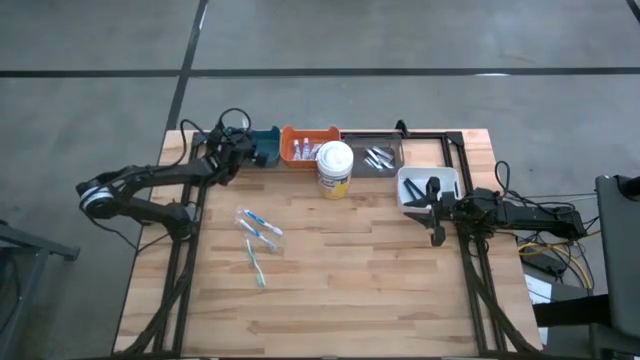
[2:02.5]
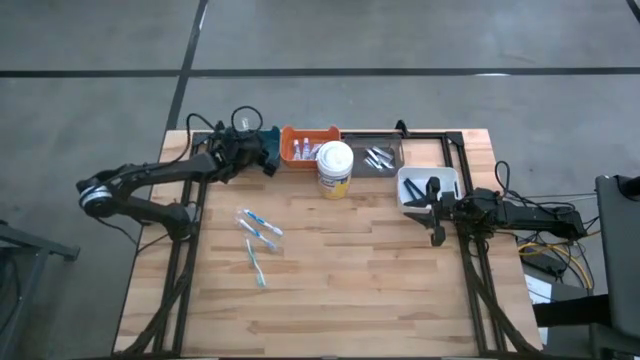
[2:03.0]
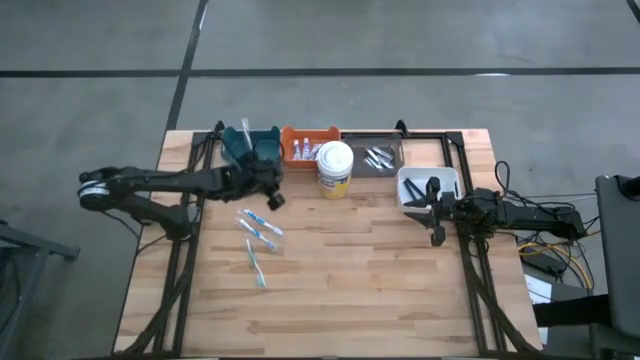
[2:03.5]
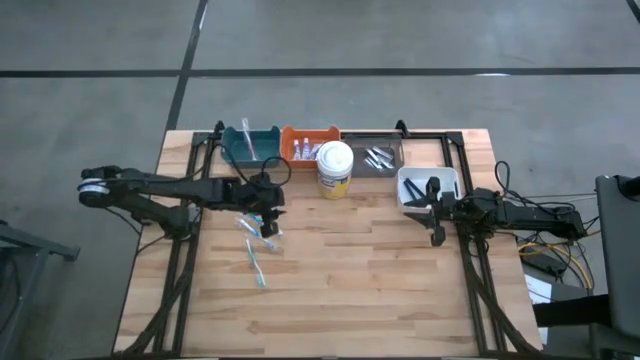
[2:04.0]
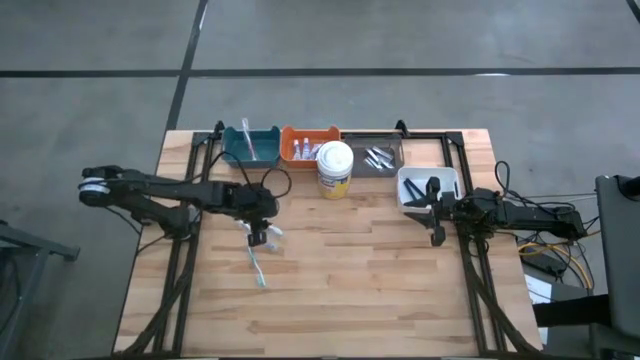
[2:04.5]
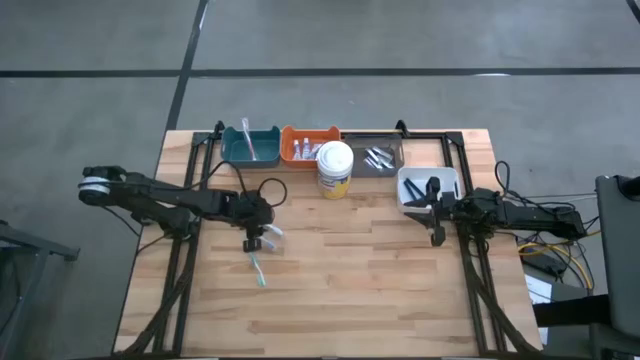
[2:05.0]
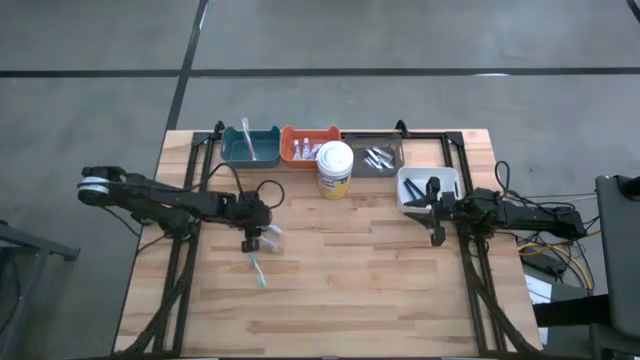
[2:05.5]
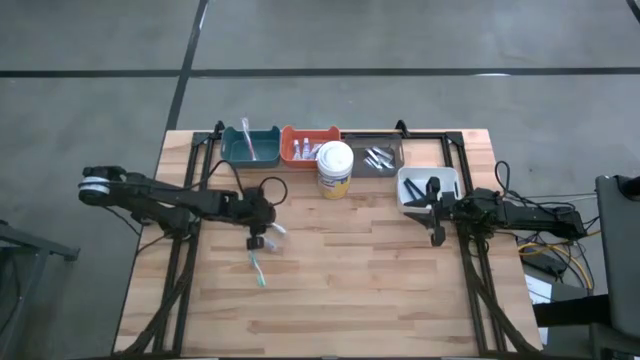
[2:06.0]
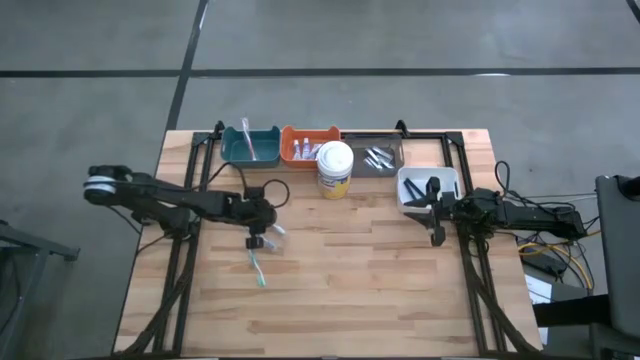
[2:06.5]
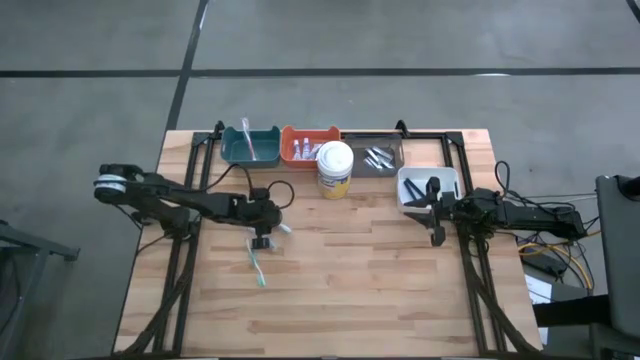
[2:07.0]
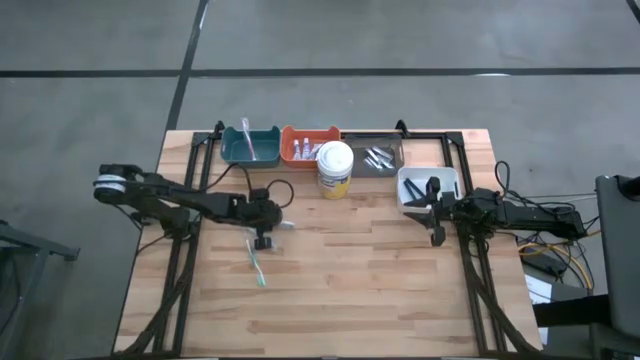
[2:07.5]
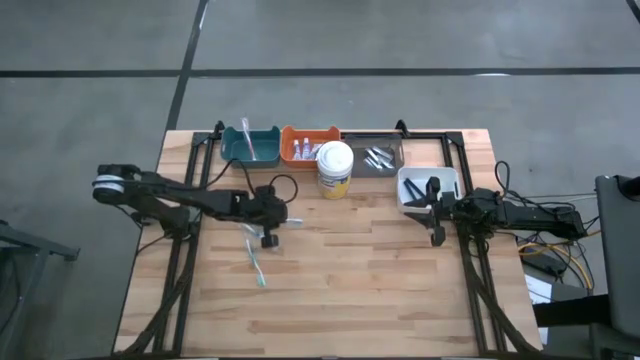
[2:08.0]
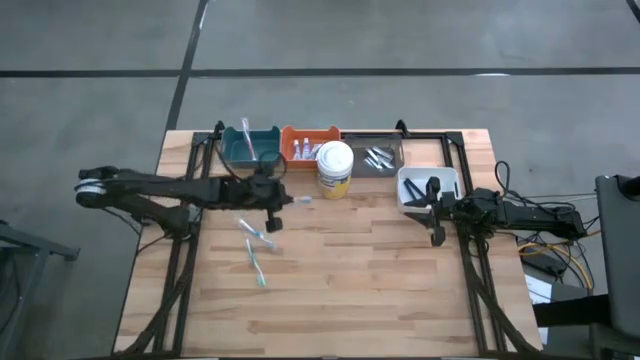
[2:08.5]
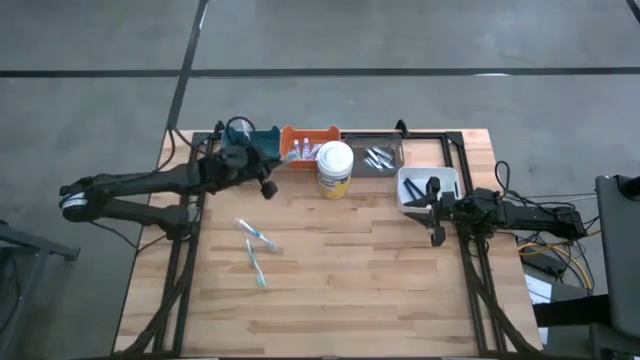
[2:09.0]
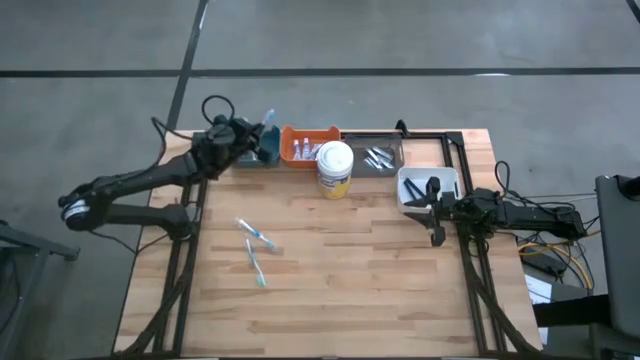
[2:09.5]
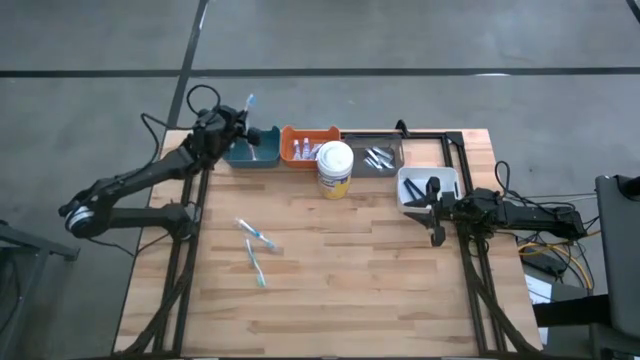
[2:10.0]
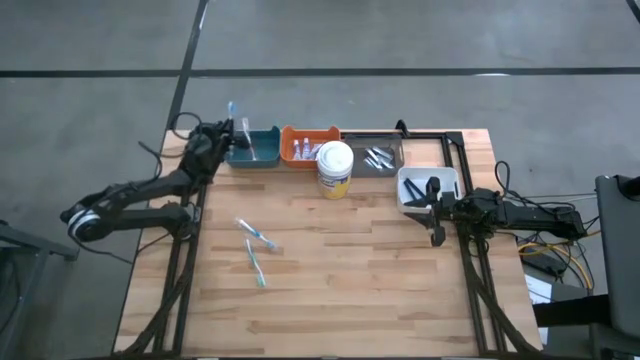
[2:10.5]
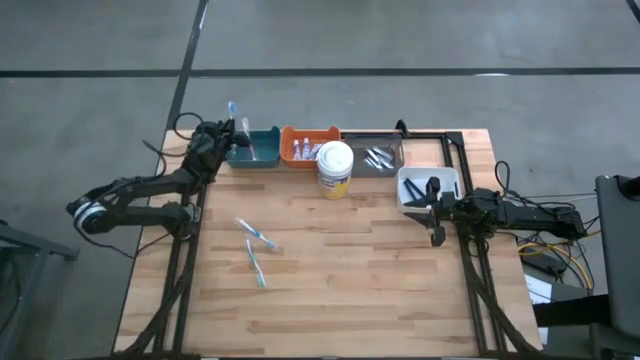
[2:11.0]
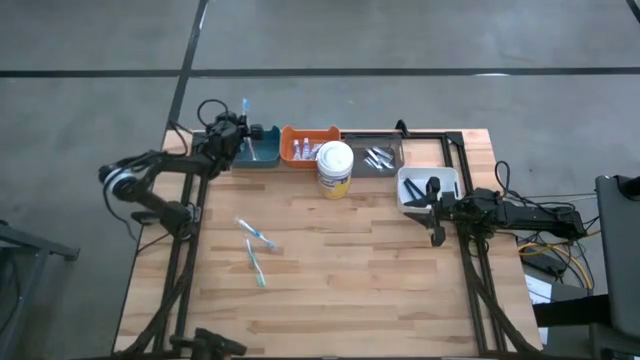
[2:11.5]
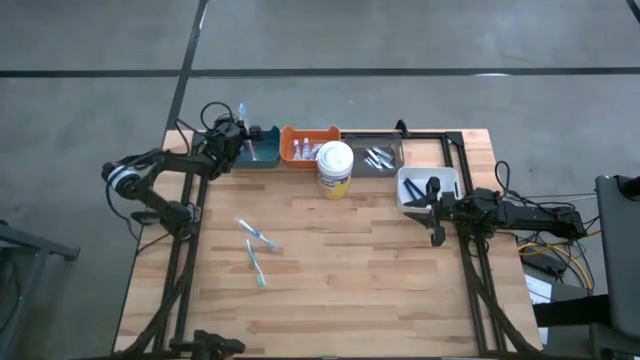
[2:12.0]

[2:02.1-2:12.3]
Task: Pick & Place Travel size toiletries
Put the top blue toothbrush into the blue bin

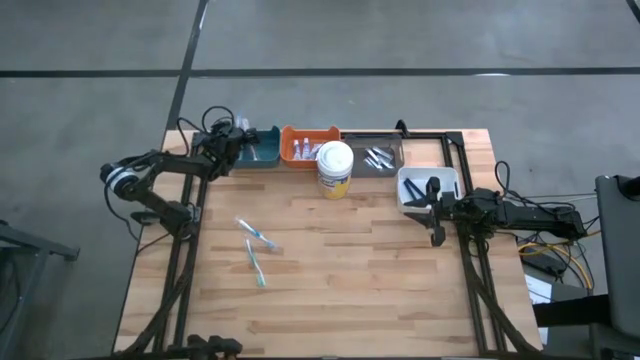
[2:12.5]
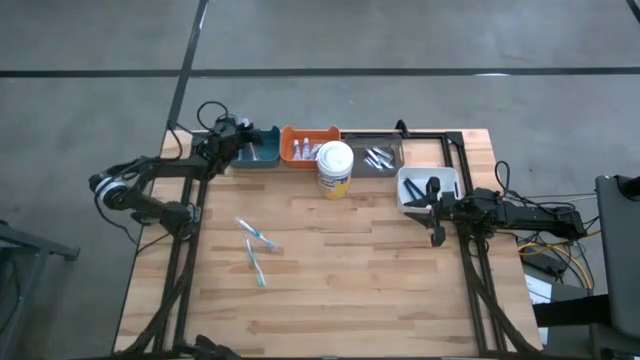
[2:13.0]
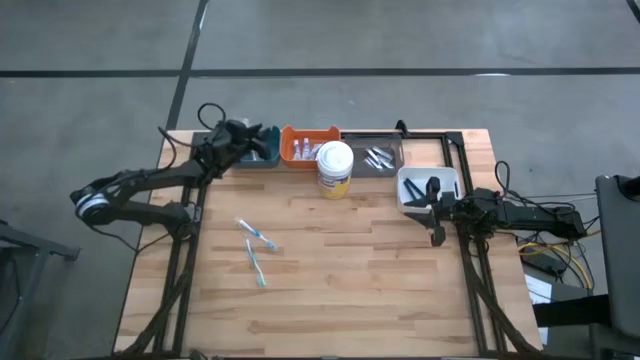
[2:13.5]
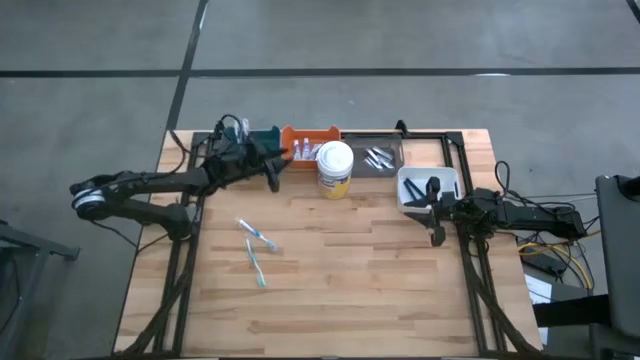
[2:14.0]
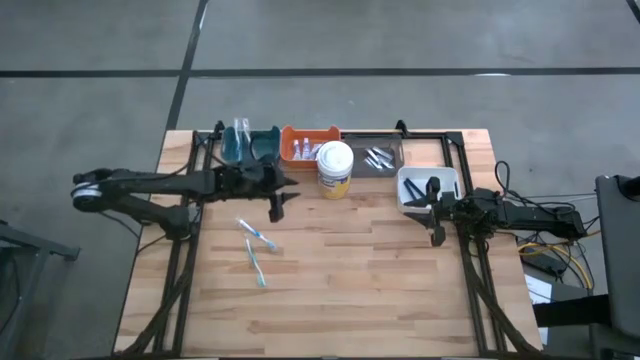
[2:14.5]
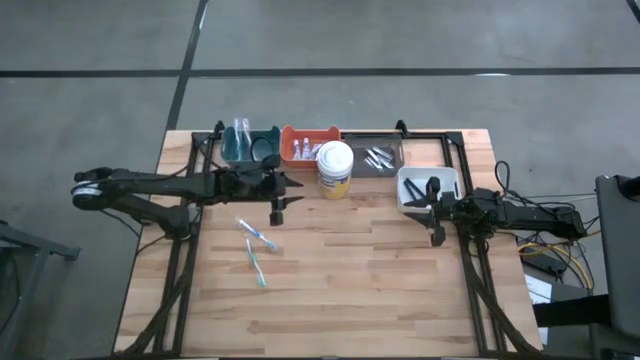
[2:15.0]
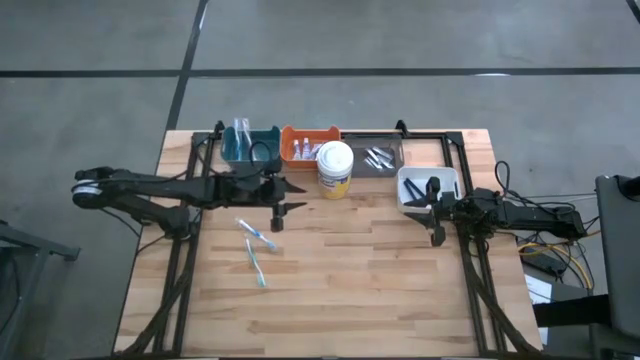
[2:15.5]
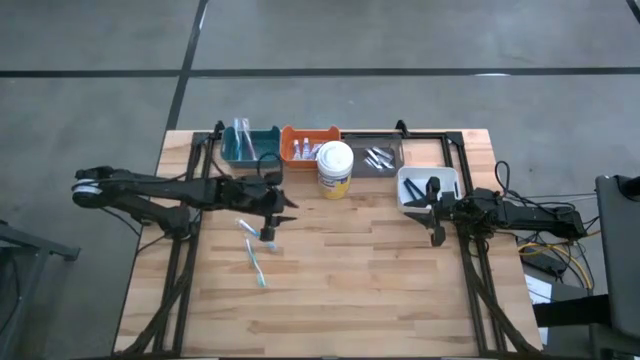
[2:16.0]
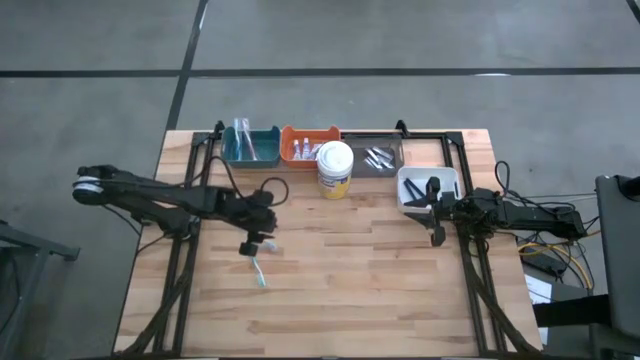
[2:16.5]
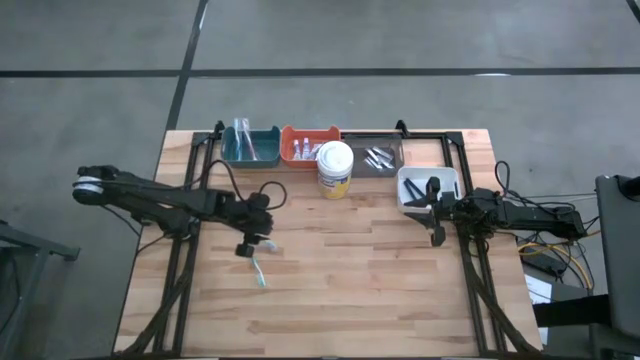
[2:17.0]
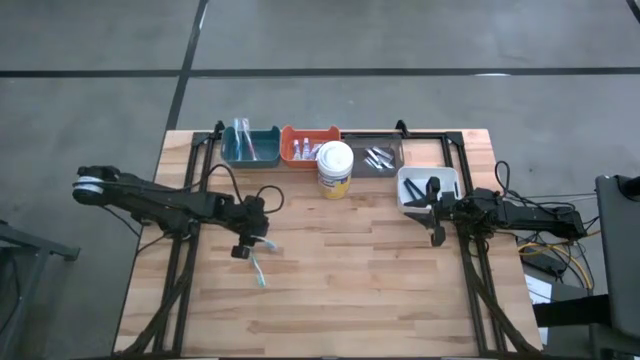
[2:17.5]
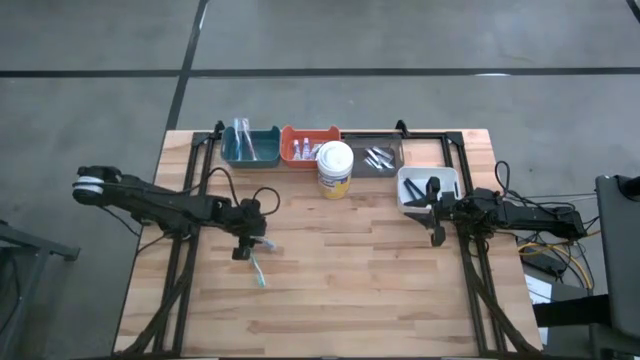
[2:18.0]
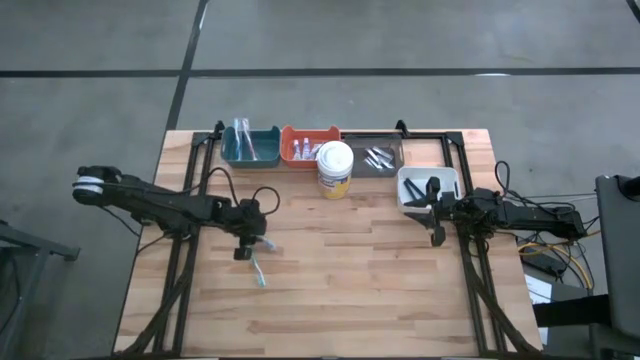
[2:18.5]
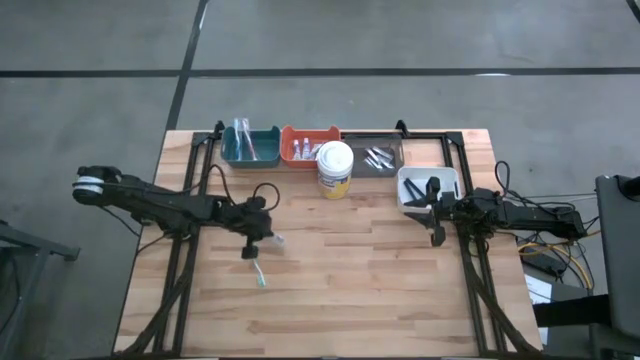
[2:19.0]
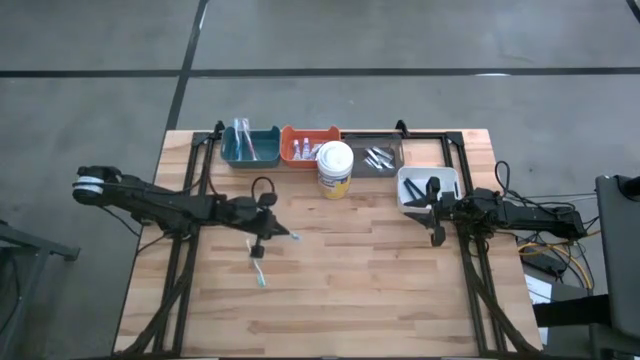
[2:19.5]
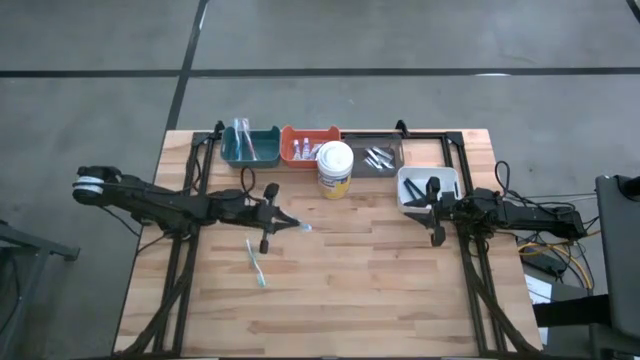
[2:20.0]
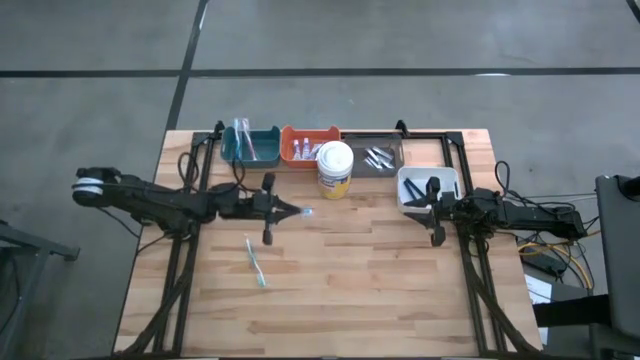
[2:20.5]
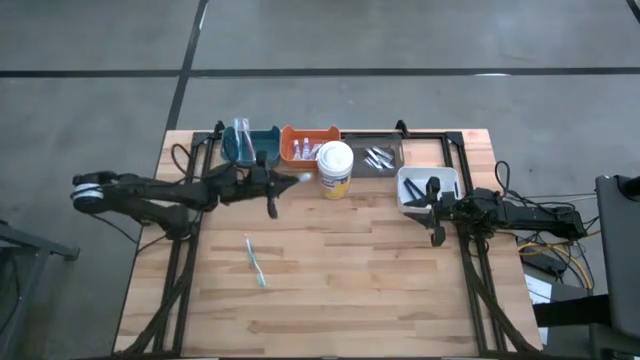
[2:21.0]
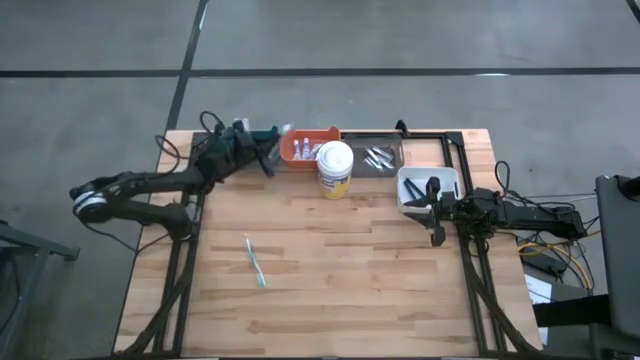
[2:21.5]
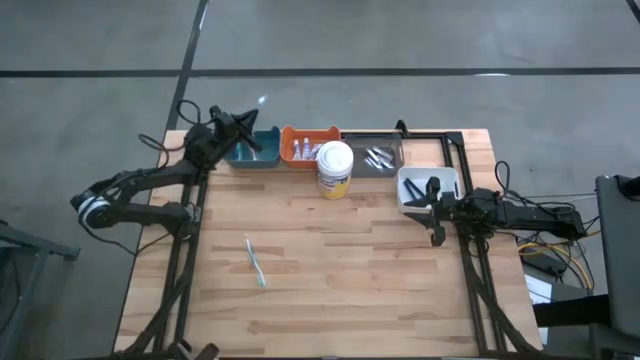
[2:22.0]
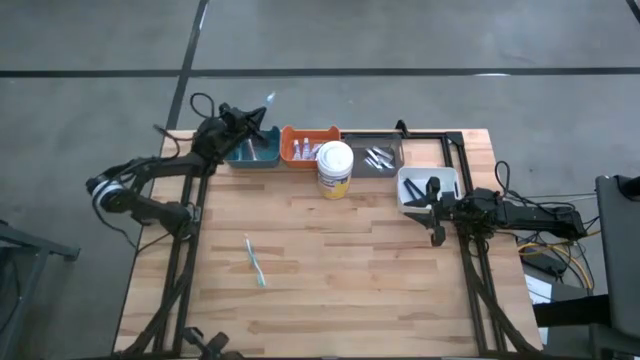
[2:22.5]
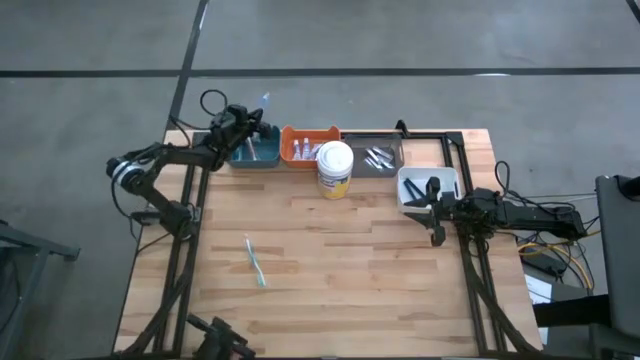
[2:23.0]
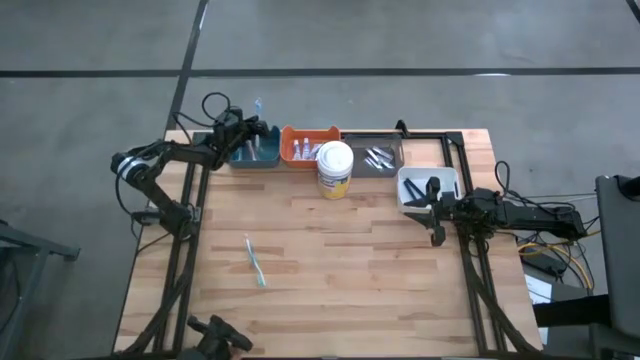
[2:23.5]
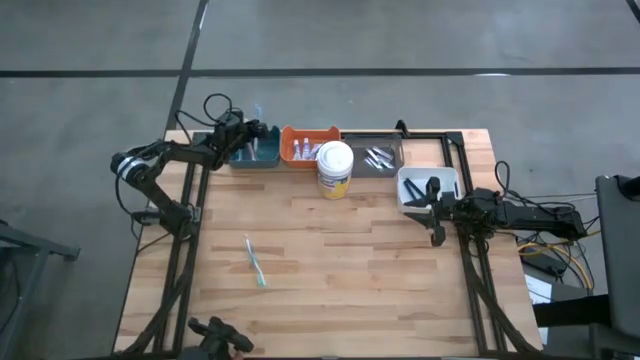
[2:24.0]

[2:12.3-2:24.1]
Put the blue toothbrush into the blue bin
